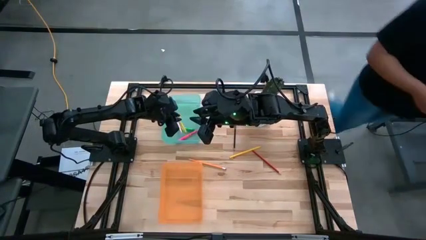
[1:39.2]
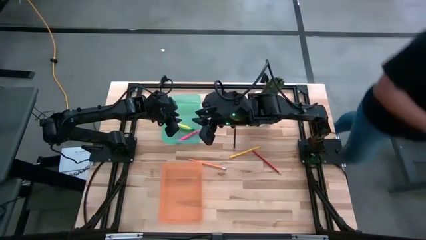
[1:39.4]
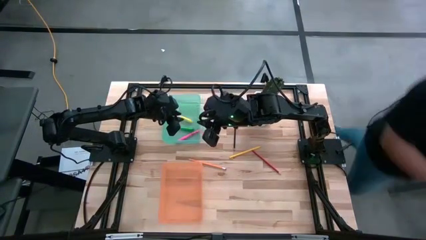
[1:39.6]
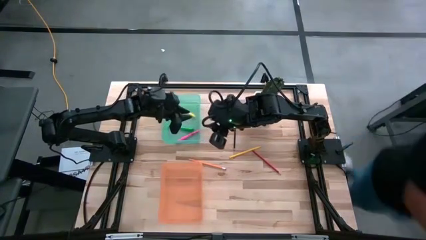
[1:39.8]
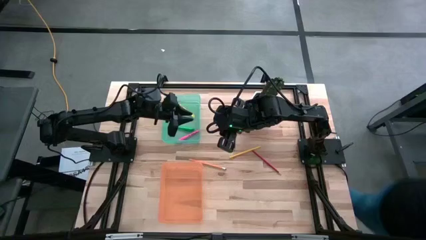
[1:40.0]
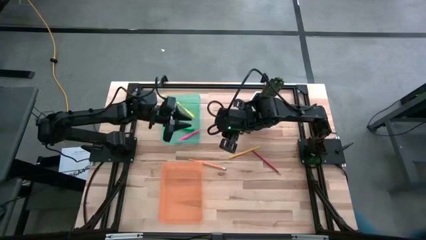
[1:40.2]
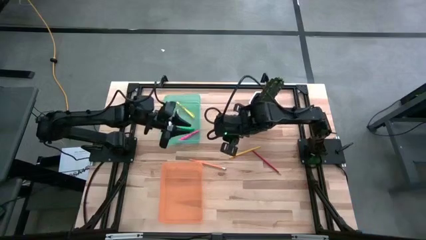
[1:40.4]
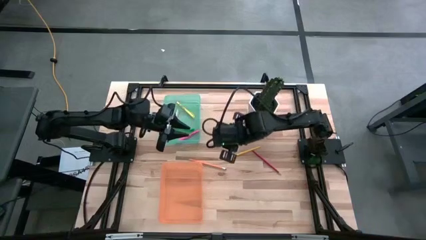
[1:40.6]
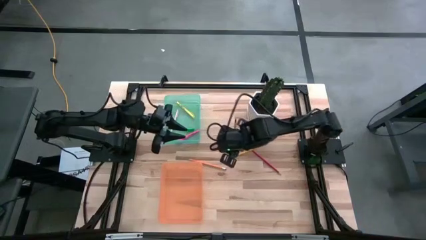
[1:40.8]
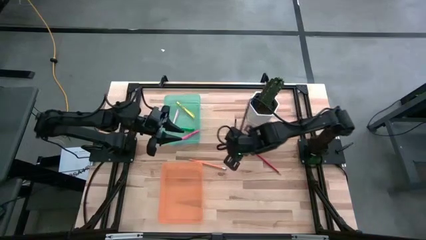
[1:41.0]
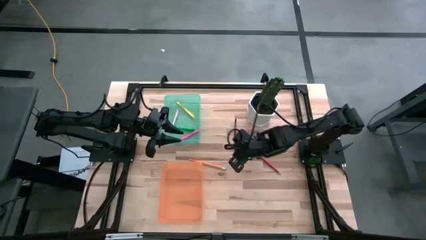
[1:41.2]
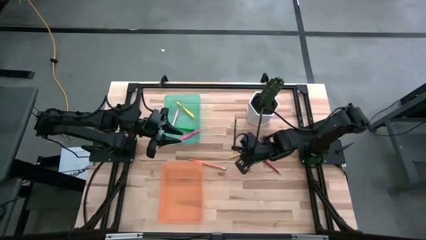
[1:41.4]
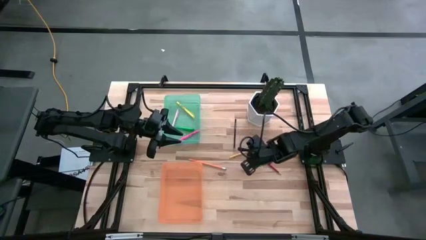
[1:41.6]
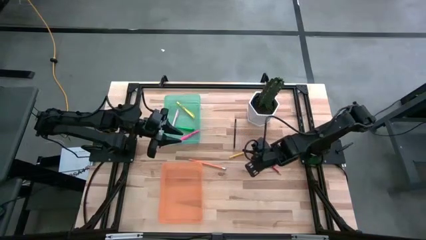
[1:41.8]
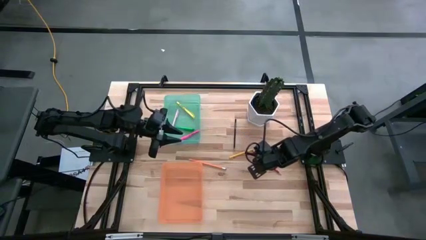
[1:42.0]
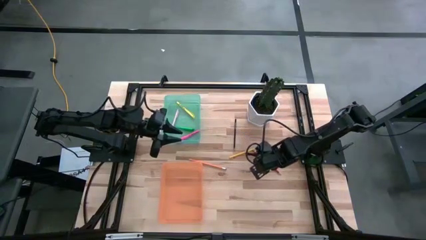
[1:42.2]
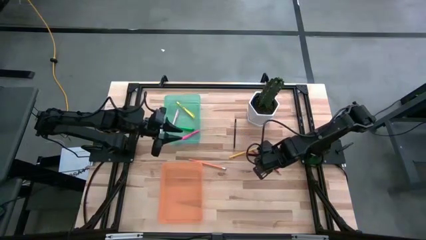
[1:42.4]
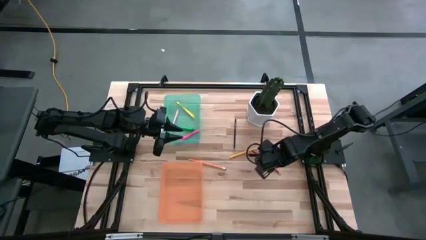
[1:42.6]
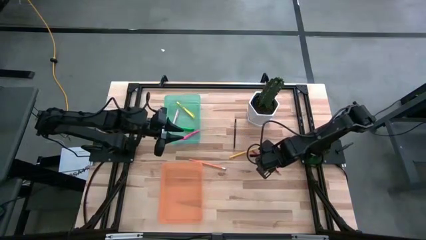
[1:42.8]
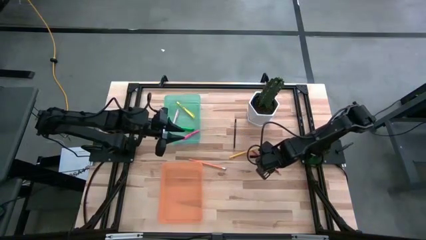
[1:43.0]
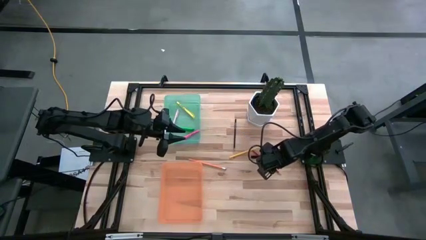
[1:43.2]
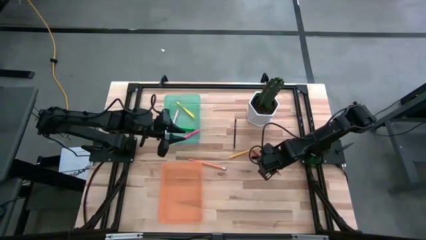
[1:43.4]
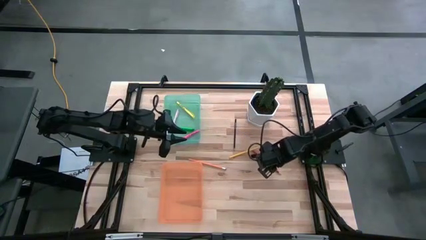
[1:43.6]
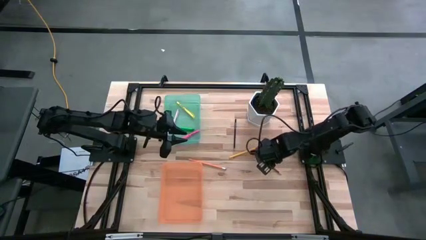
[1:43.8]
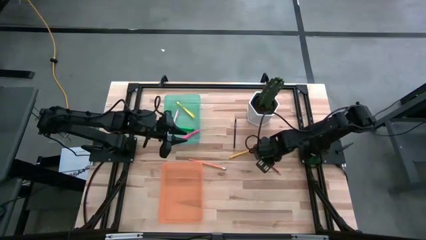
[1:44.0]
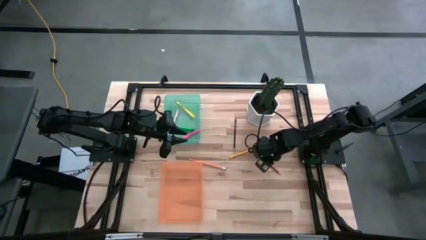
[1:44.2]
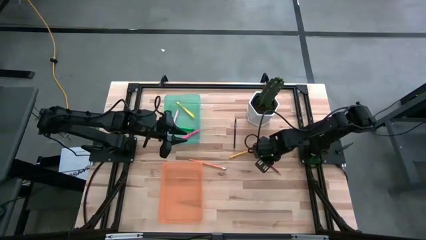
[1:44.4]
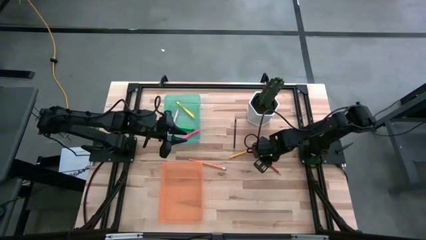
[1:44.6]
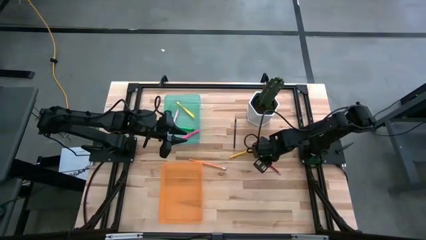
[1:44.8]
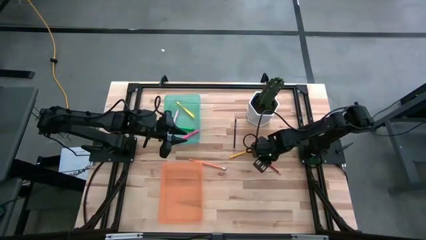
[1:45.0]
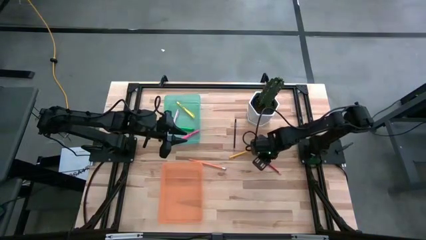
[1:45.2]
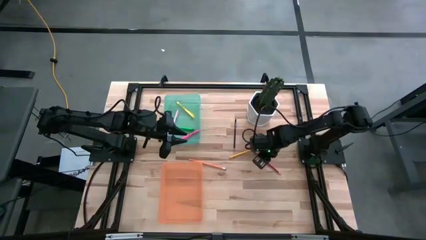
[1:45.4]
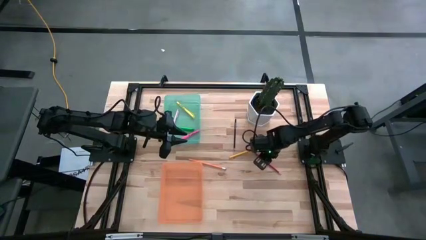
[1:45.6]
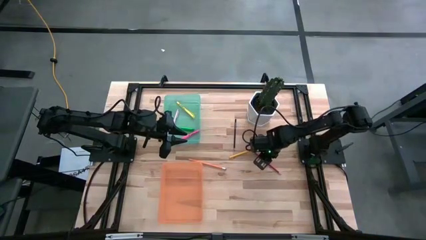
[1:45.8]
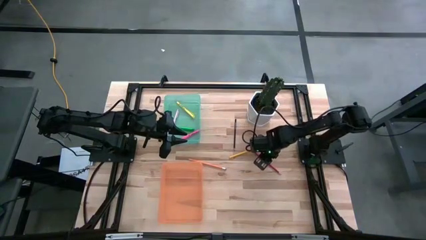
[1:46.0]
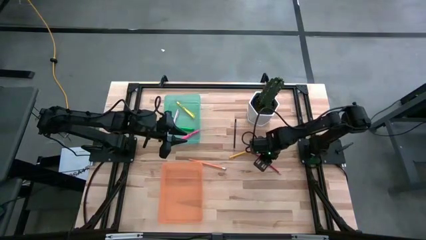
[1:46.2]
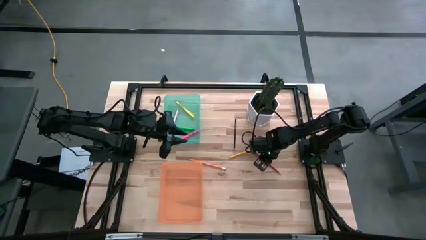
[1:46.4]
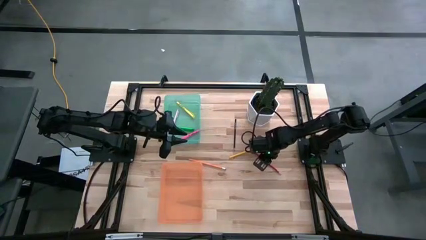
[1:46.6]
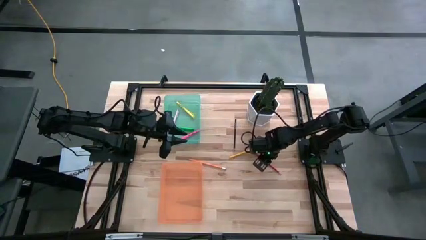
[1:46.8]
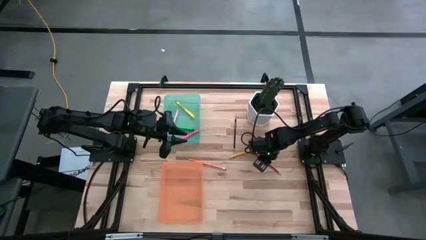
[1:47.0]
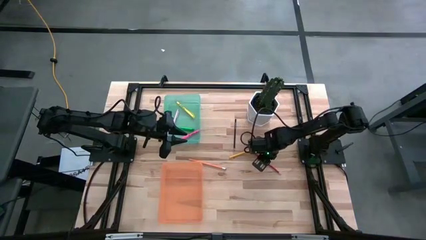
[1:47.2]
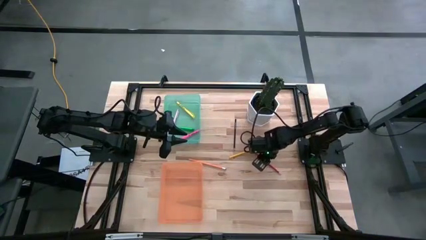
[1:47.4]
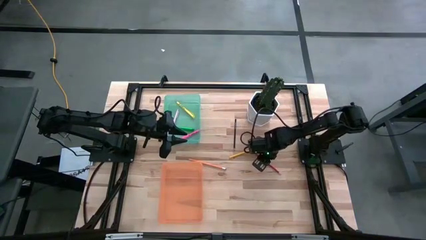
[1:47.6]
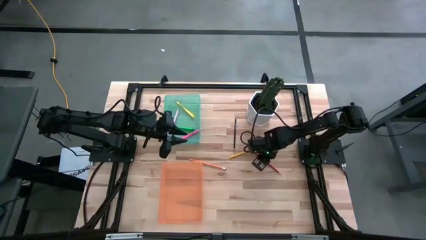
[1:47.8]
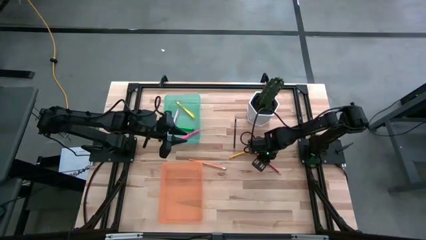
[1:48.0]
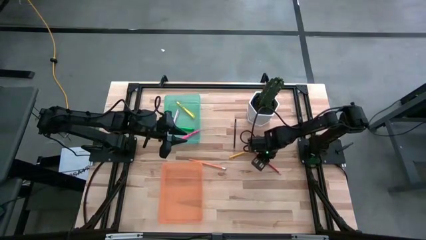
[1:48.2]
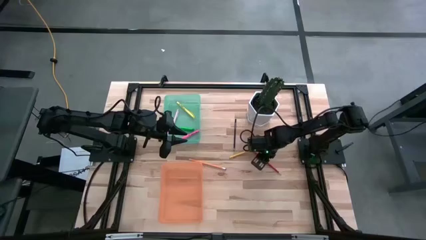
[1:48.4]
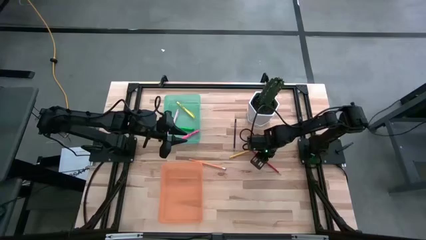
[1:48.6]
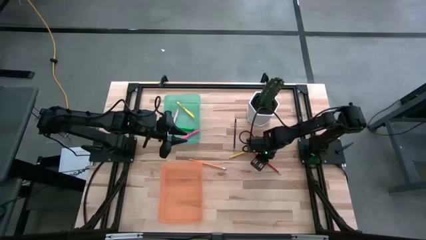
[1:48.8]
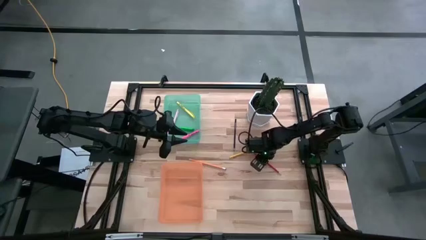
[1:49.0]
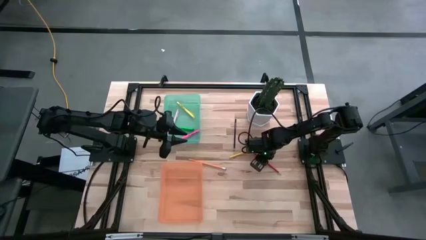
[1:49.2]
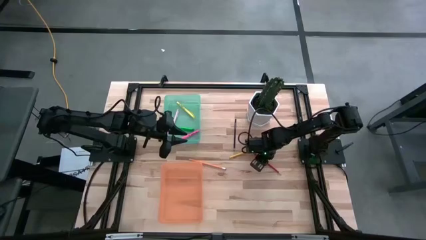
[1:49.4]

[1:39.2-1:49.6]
Task: Sort pens & pencils
Put the red pencil into the orange bin

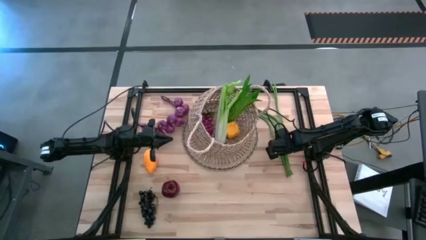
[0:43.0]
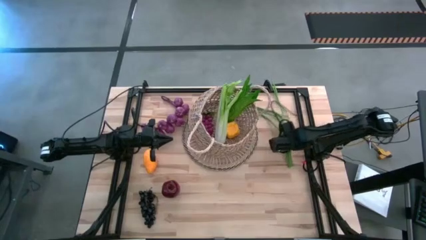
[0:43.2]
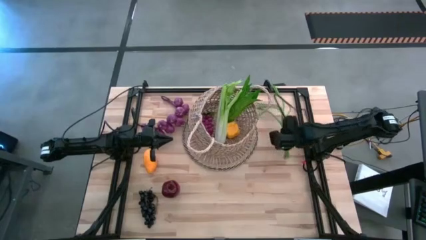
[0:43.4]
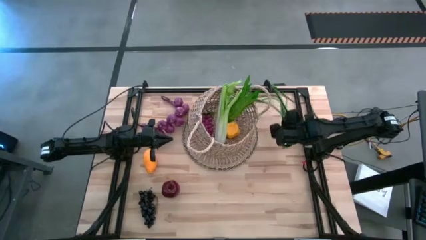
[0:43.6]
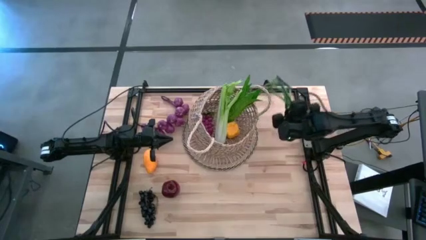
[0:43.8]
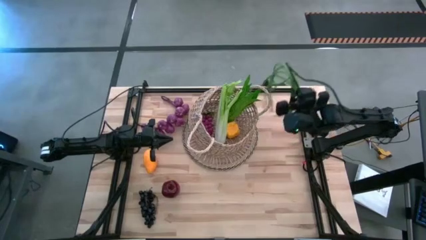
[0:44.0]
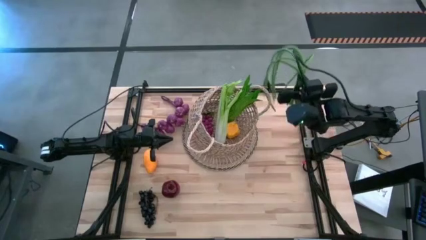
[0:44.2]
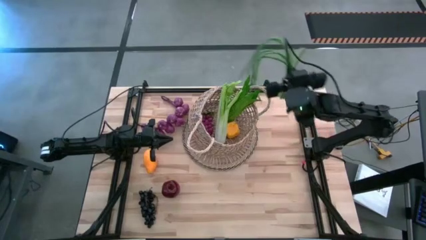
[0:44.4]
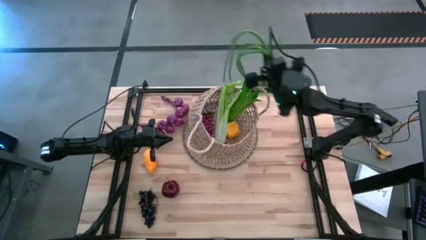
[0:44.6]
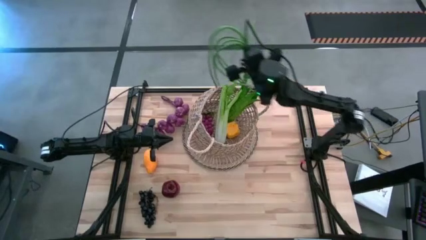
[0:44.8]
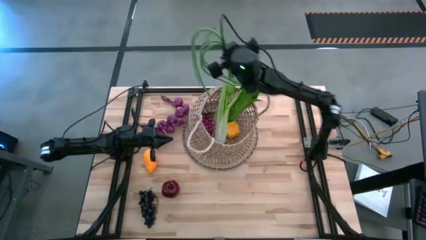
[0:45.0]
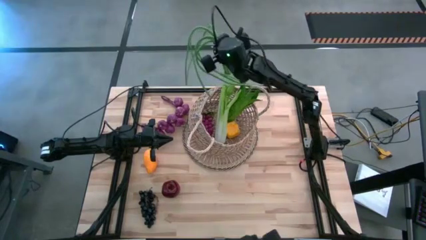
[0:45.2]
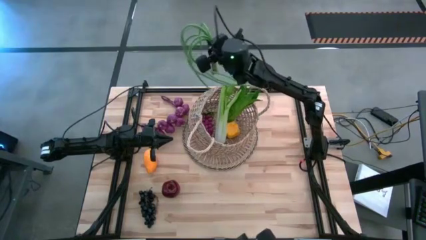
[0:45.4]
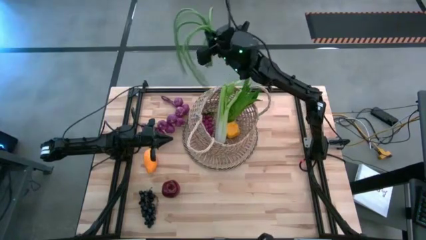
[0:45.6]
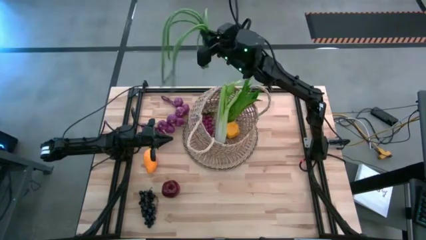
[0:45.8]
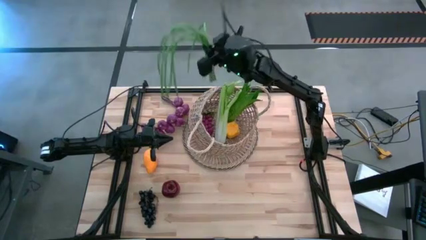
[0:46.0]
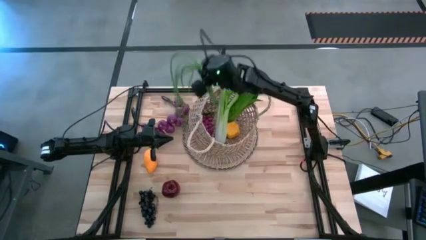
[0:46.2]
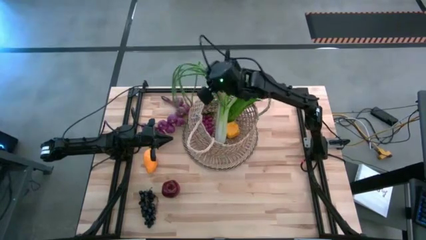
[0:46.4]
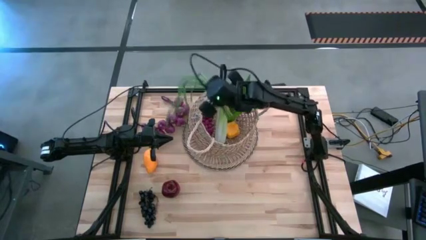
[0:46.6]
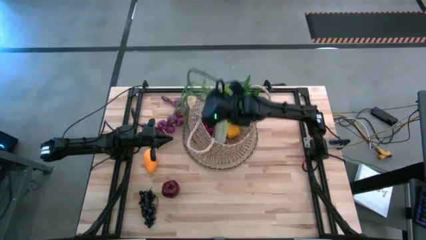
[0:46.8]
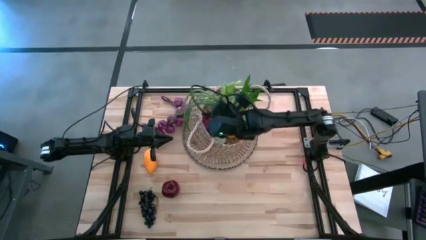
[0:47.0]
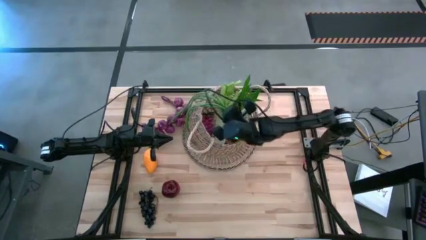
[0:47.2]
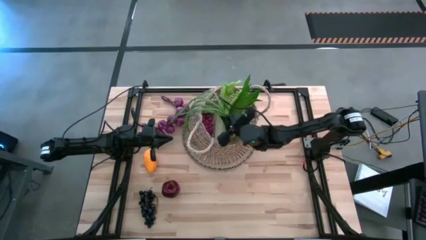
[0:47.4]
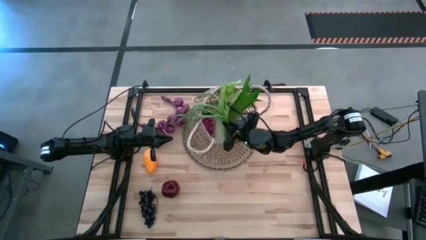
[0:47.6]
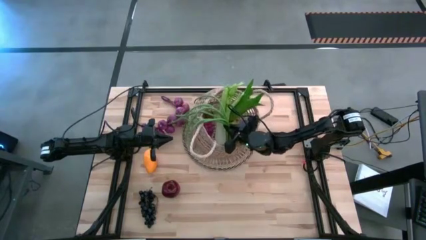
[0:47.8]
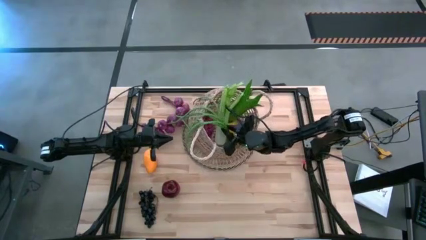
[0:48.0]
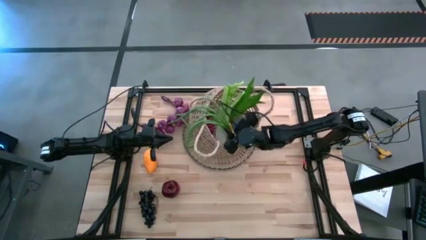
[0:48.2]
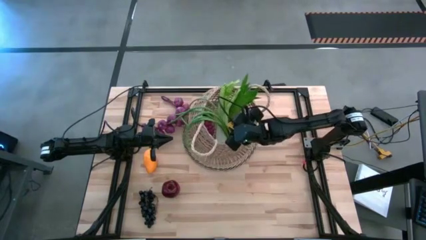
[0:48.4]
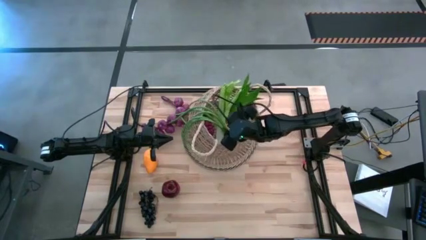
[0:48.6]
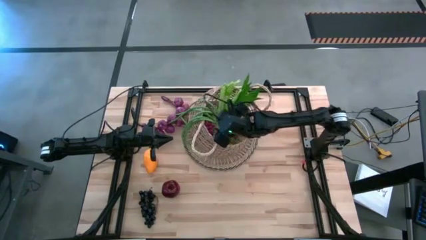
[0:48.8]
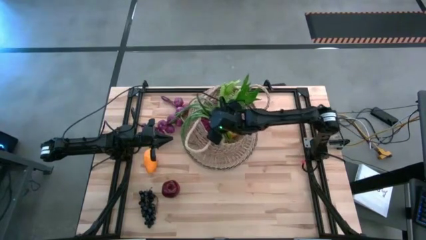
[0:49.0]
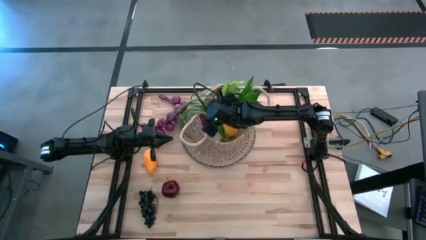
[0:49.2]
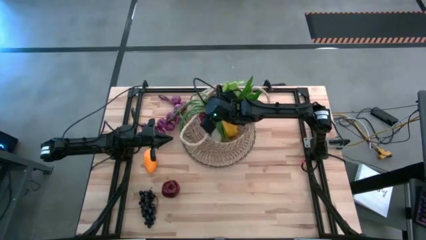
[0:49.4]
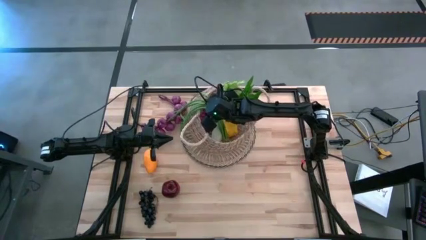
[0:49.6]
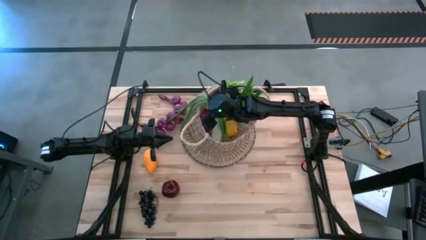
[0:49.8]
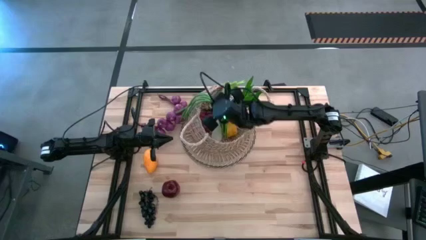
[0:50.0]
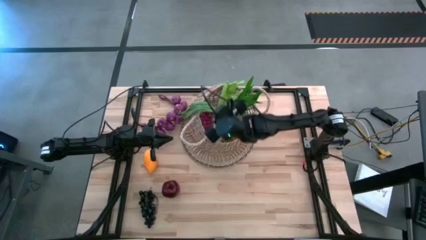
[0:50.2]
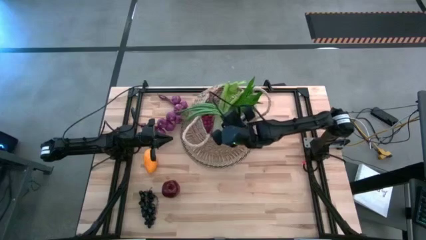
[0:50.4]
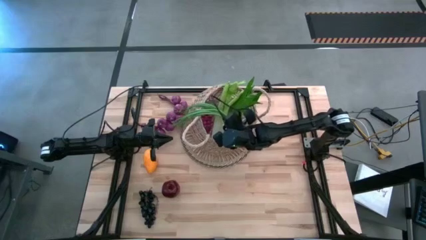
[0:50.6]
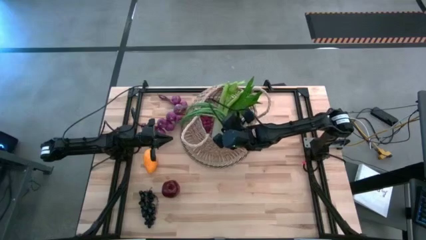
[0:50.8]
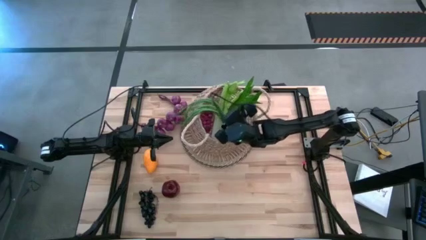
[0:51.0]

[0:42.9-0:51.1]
Task: Build produce basket
Put the string beans into the basket
